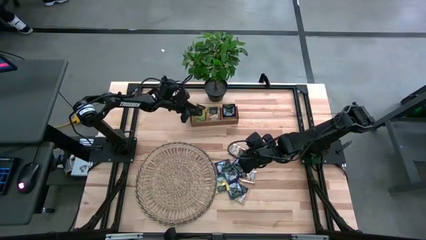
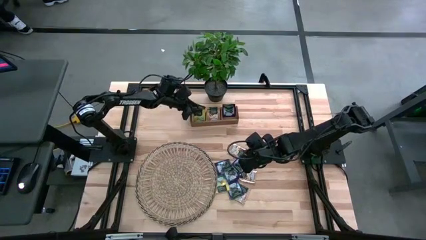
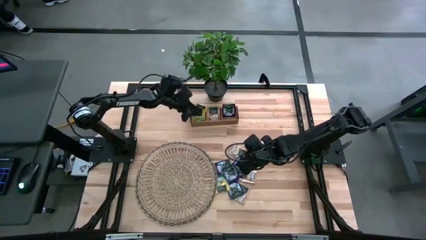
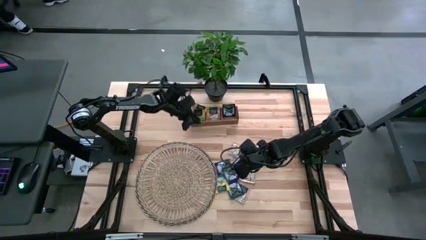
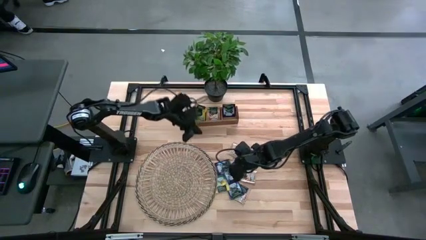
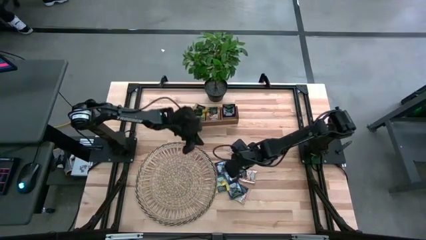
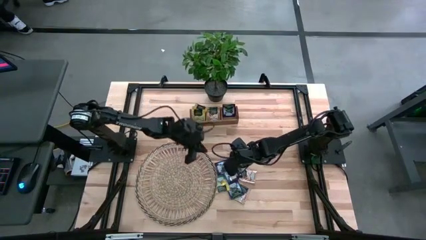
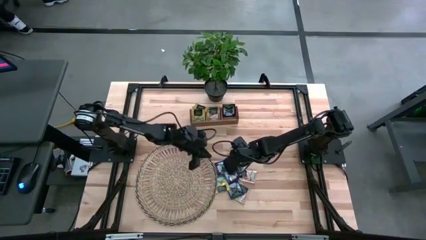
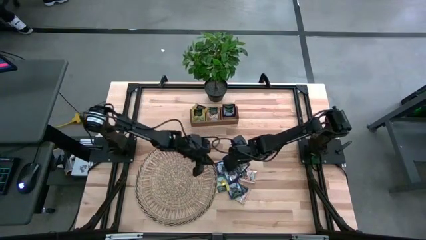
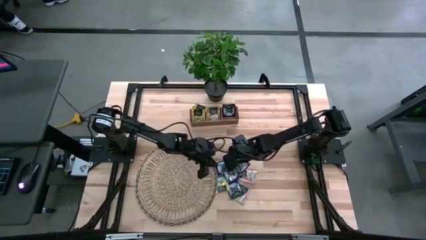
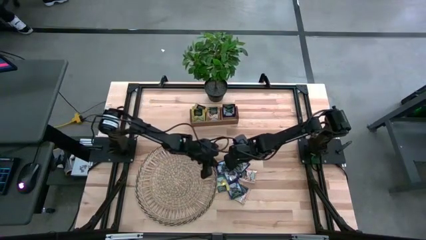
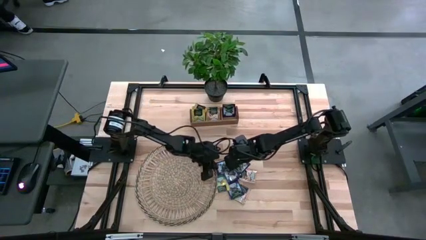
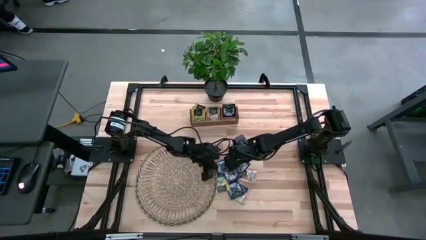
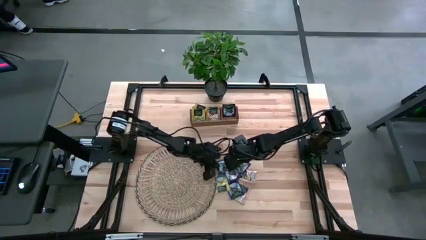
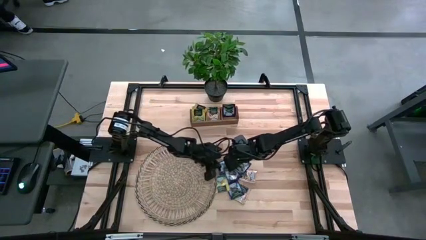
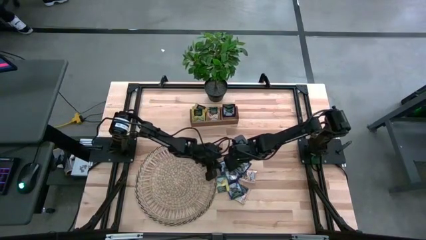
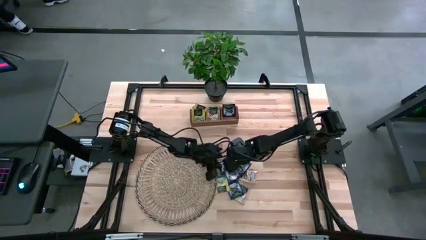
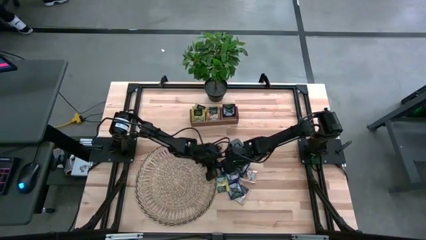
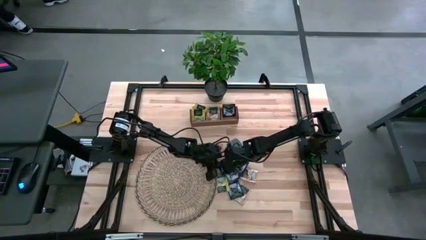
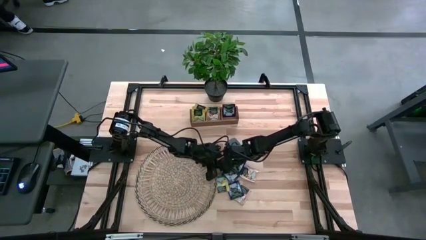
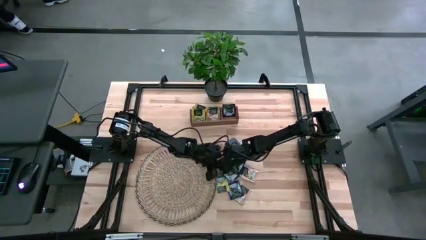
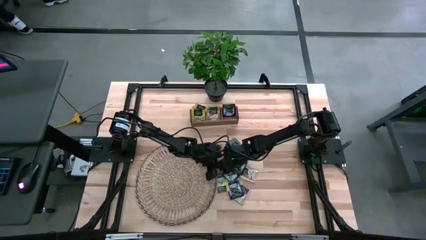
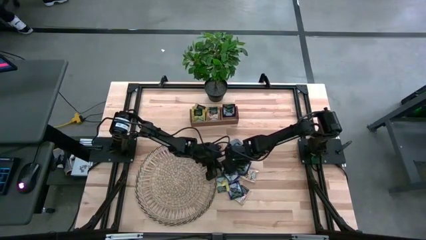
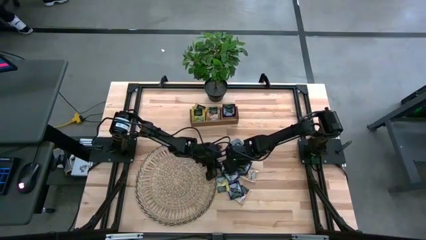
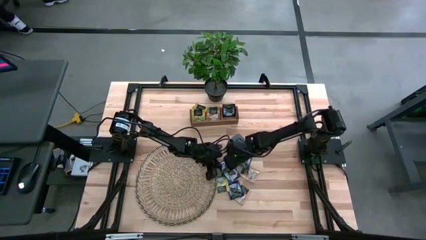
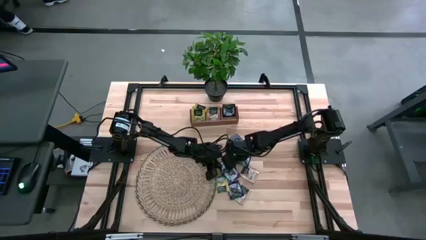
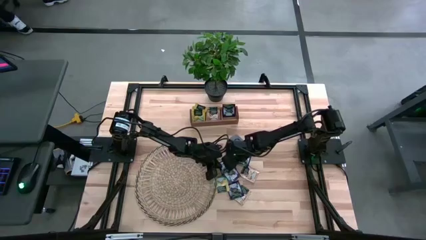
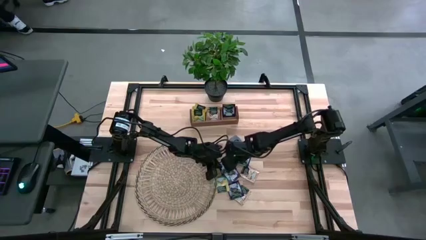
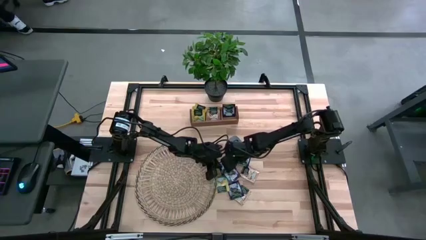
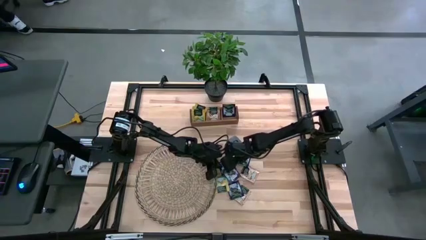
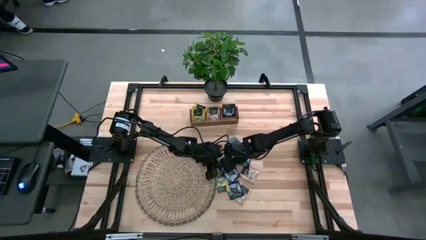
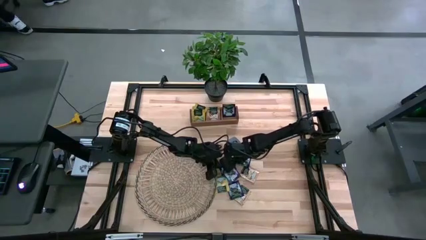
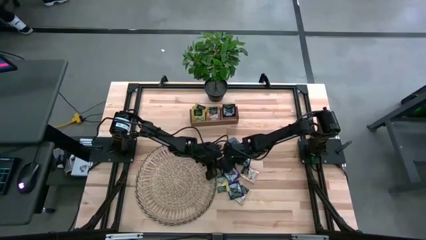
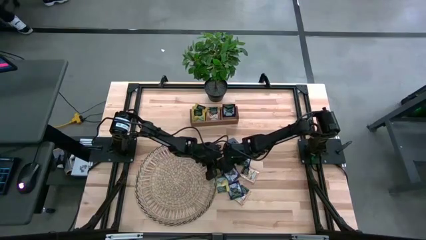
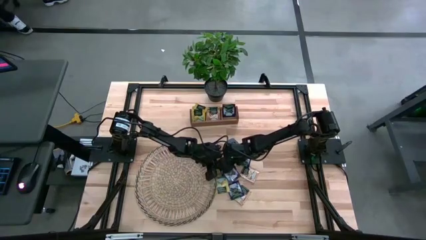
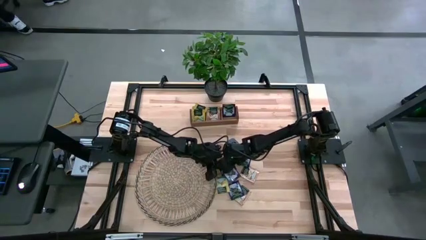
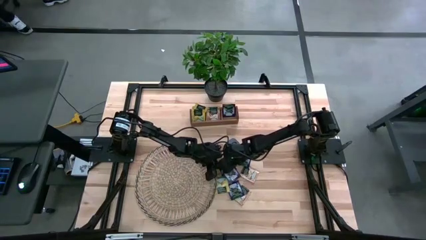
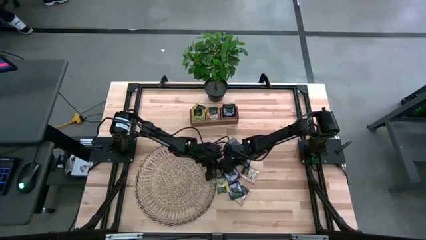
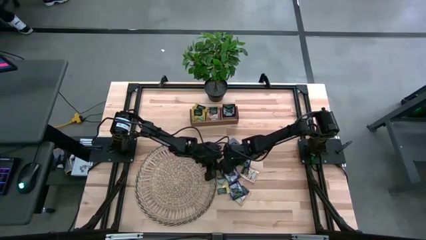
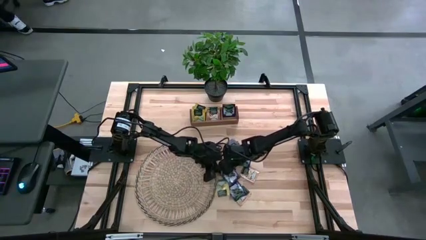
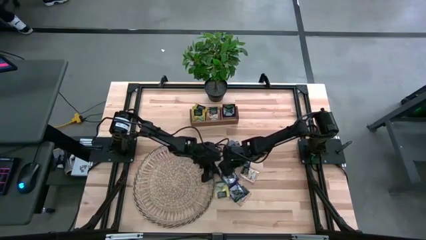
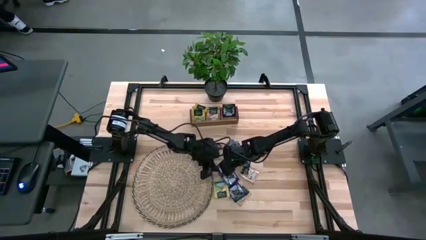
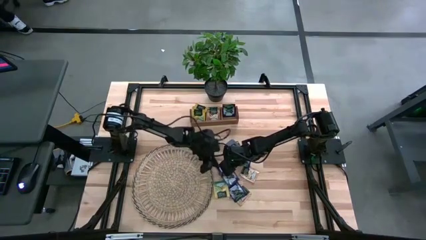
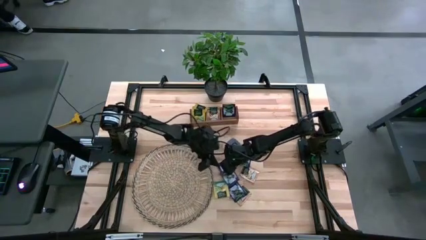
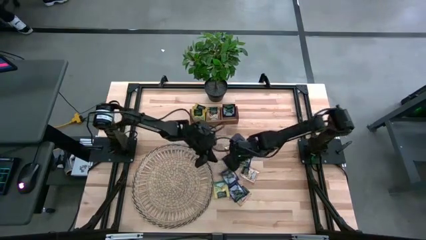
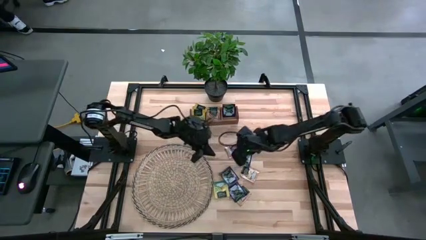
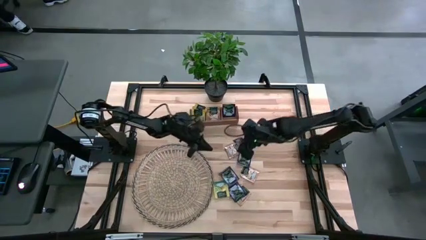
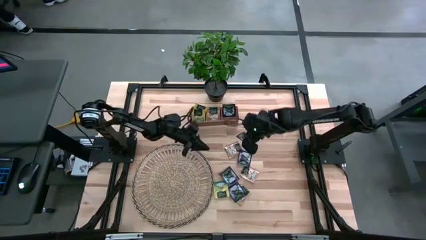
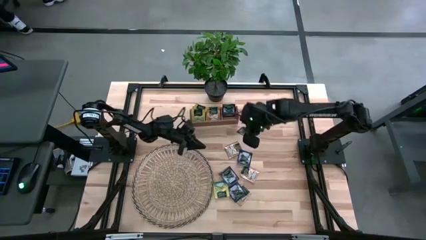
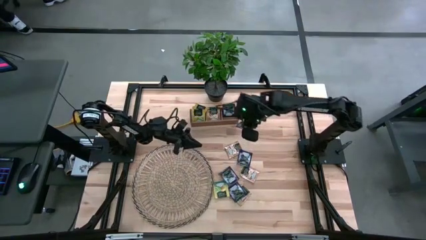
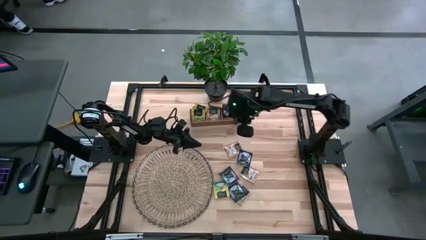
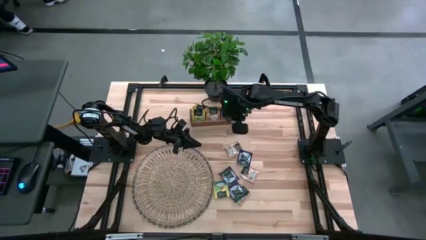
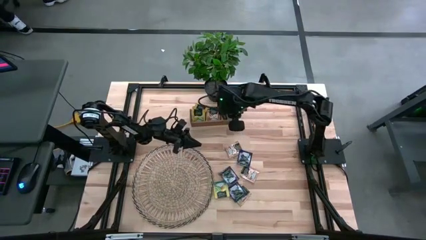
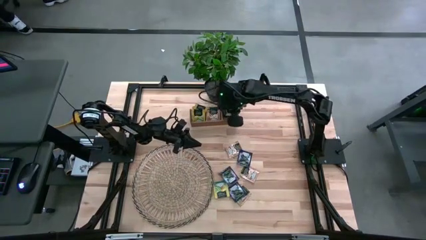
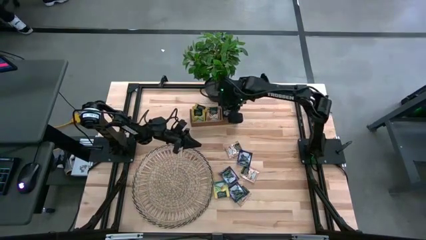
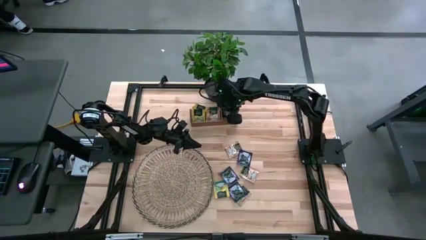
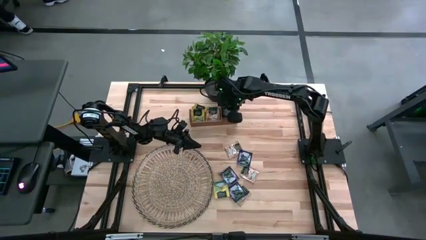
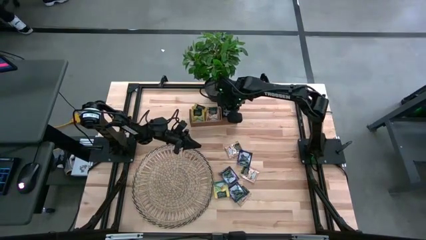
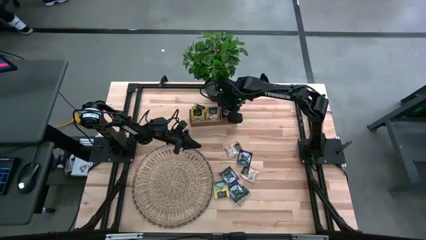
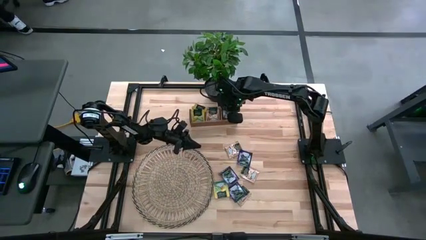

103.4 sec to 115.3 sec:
Task: Pick & Place Tea
Put the blue tea bag into the right section of the wooden organizer
